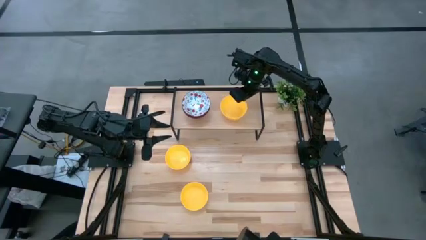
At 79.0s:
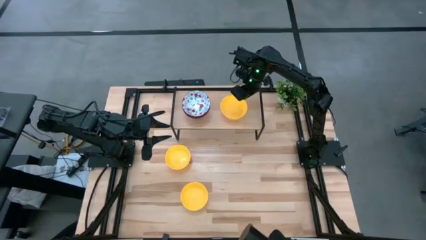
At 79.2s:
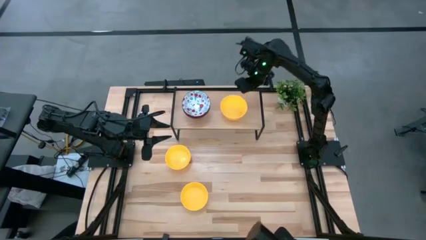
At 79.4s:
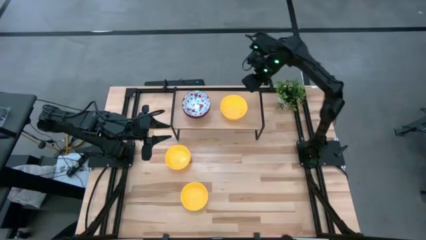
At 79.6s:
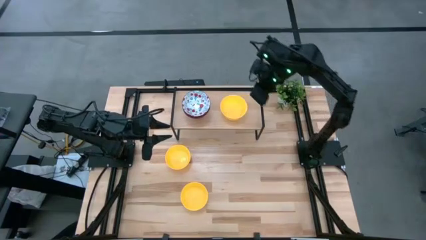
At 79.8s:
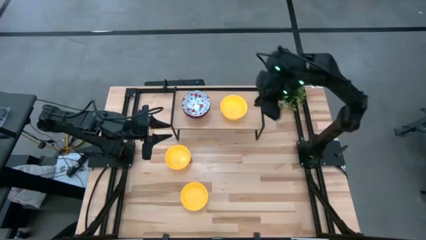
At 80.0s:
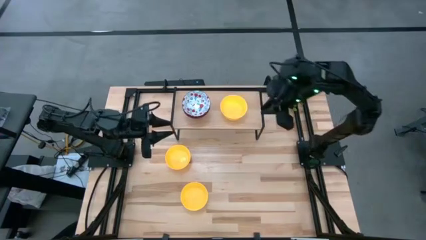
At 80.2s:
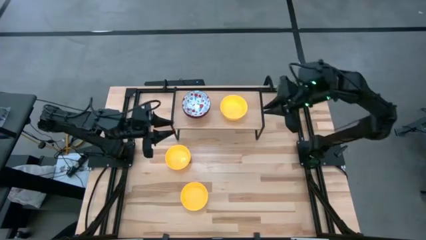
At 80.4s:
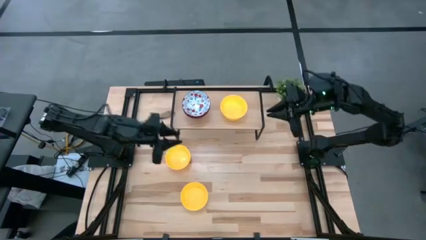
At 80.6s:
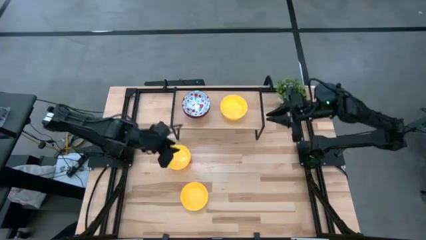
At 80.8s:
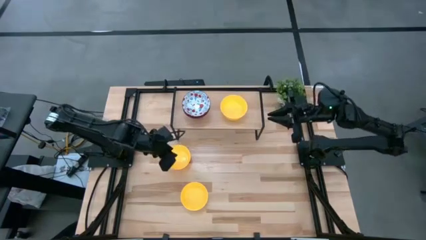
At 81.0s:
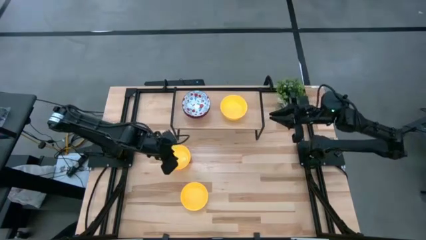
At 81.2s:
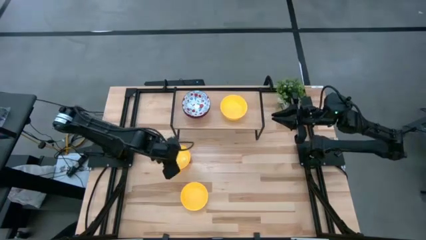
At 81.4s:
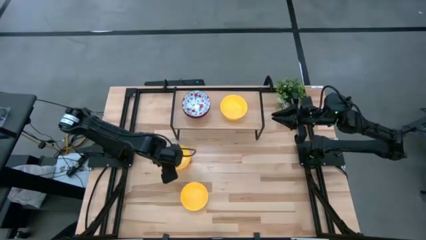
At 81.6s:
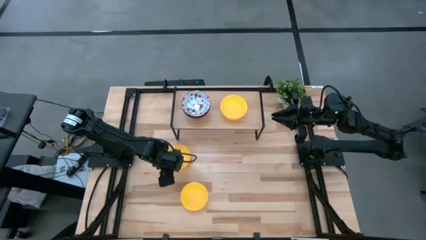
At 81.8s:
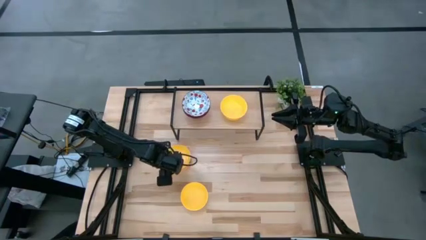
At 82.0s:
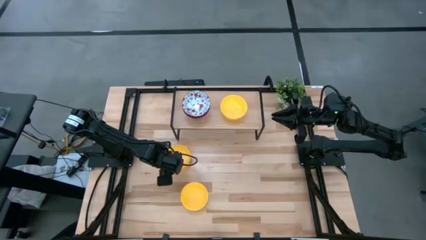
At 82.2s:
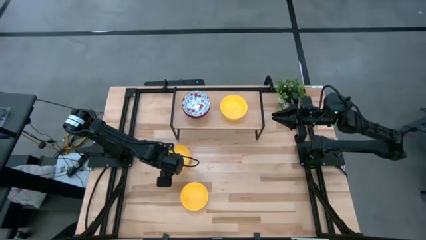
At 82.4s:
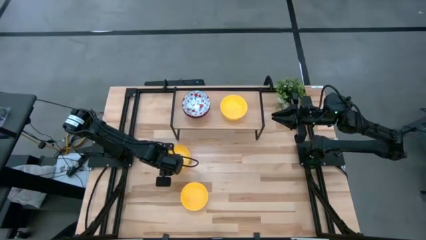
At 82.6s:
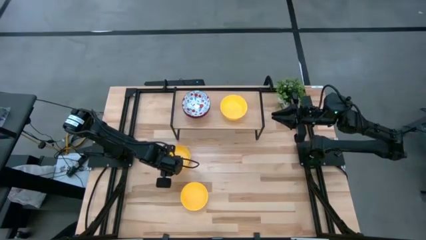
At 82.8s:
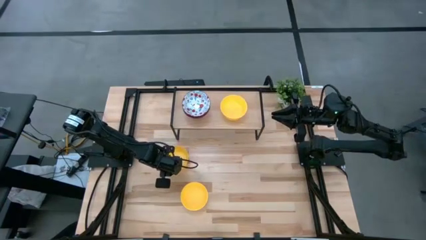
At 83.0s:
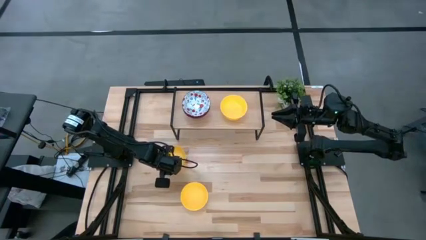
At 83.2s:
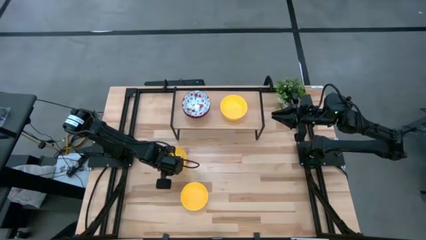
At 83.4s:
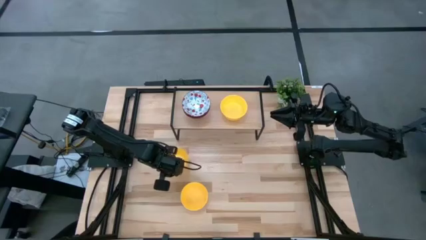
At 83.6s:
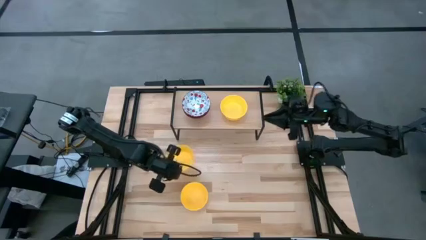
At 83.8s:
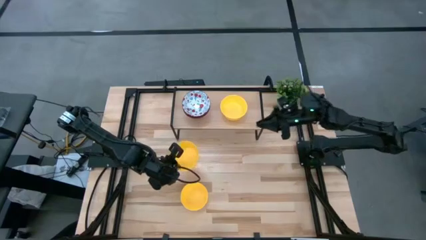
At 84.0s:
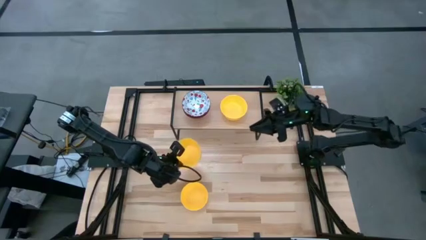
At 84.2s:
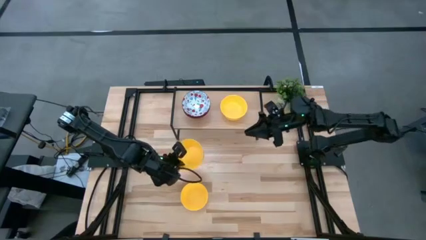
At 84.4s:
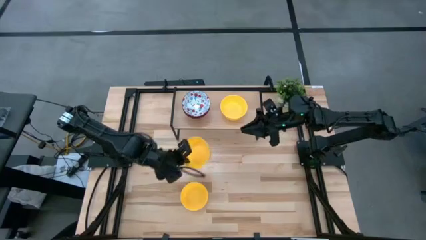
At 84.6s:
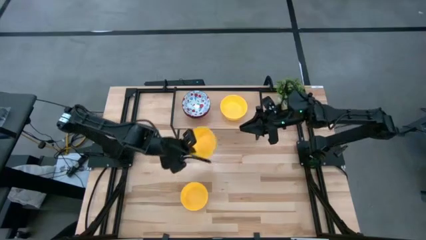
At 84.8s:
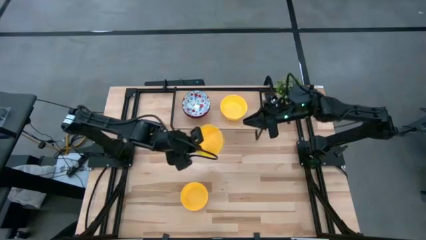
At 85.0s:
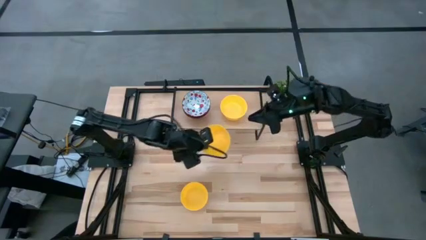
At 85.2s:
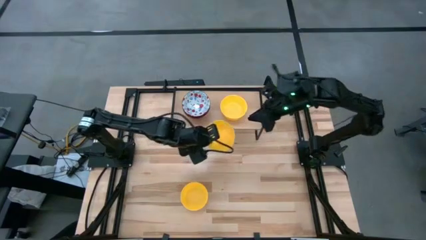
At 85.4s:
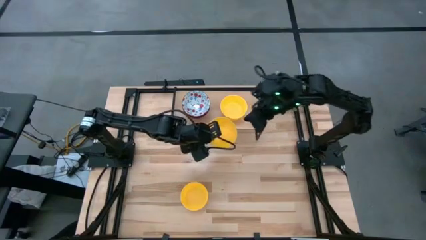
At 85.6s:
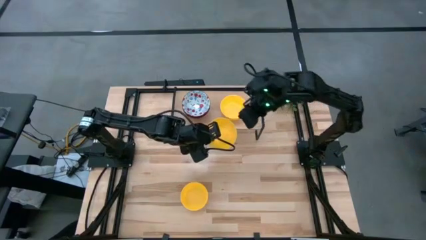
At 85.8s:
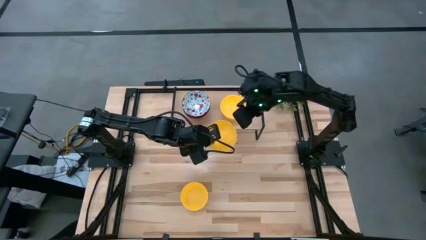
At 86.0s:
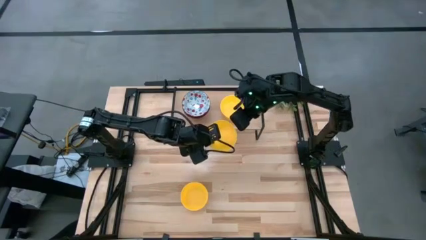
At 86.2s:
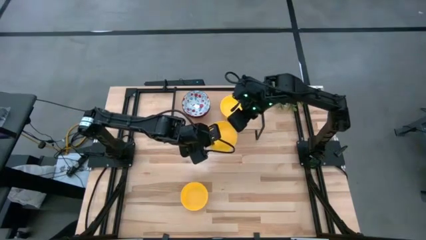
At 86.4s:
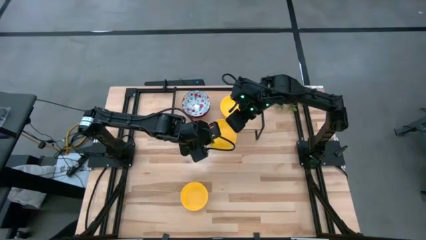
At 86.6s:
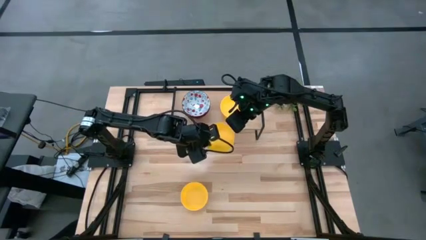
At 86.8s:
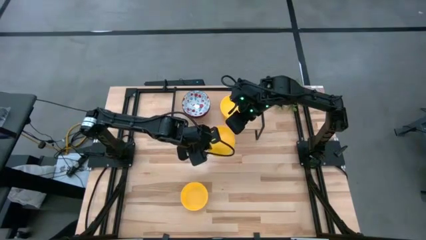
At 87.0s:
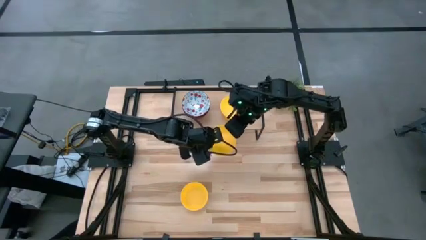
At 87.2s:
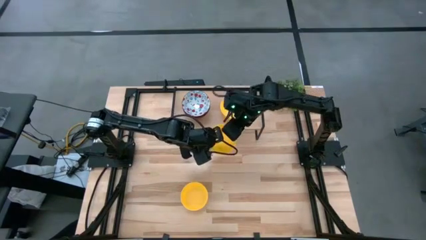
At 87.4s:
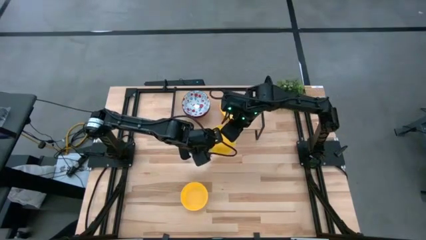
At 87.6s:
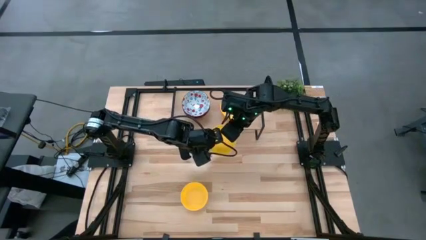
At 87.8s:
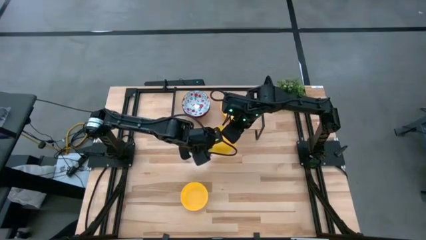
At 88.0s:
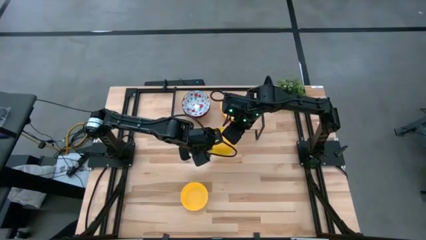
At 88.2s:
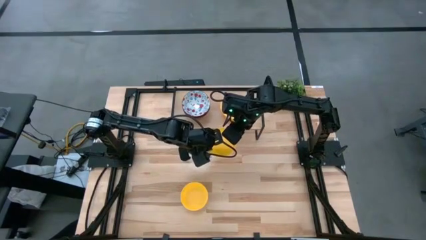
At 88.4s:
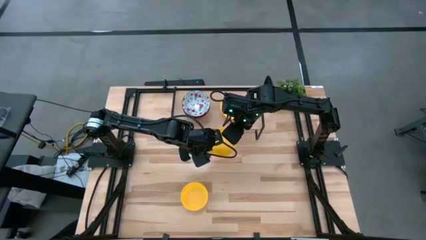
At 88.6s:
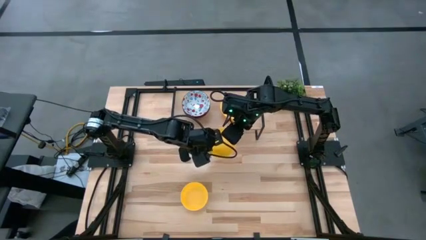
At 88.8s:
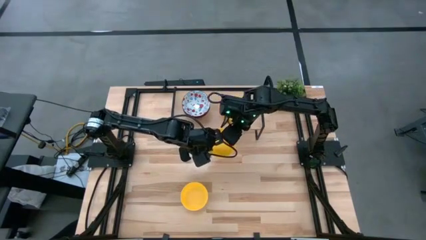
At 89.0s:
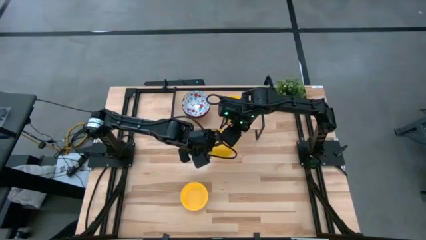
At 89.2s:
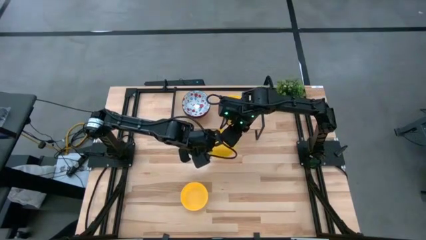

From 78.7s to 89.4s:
Task: Pick & Place Mini bowls
Stack the top yellow bowl on the yellow bowl on the shelf

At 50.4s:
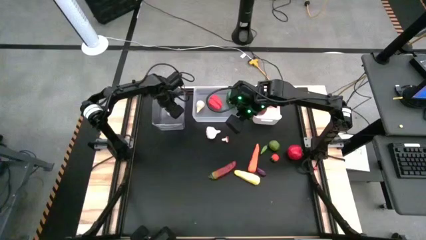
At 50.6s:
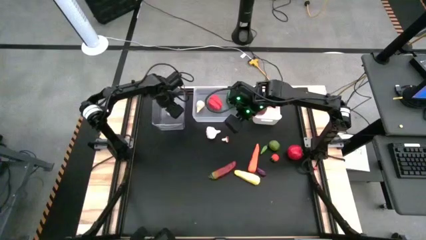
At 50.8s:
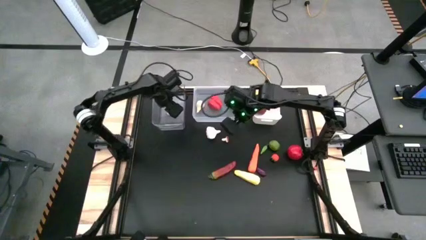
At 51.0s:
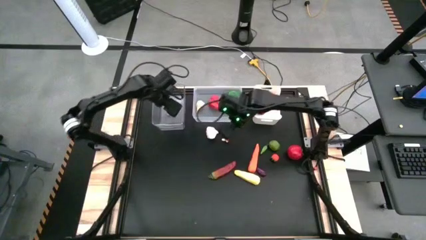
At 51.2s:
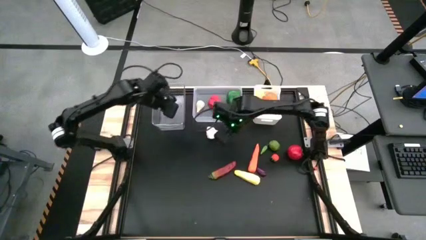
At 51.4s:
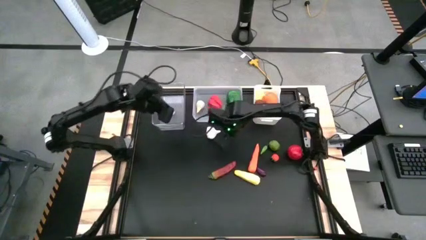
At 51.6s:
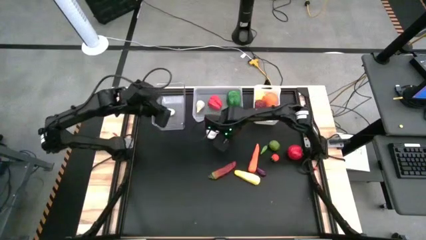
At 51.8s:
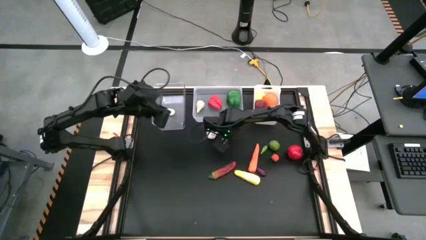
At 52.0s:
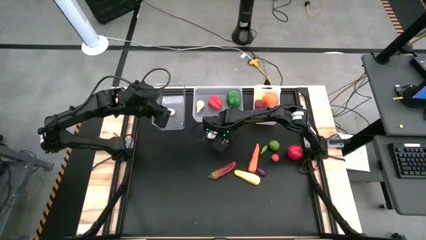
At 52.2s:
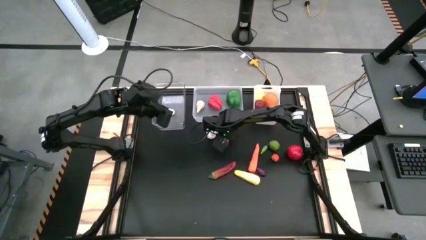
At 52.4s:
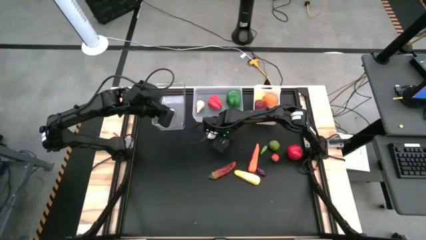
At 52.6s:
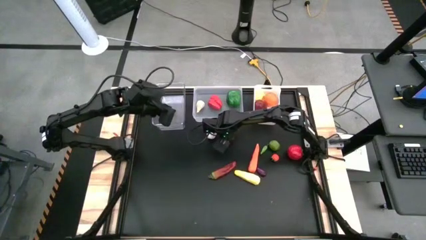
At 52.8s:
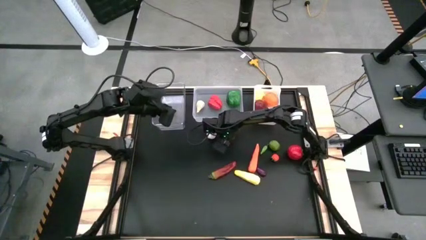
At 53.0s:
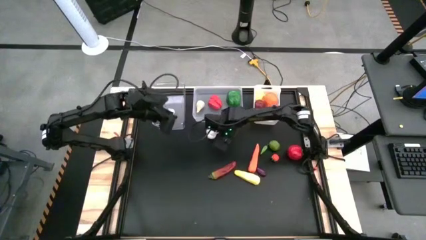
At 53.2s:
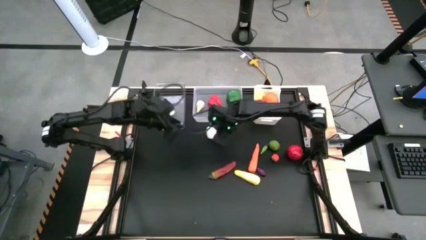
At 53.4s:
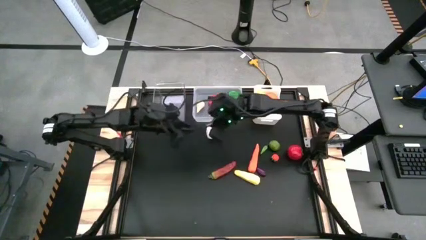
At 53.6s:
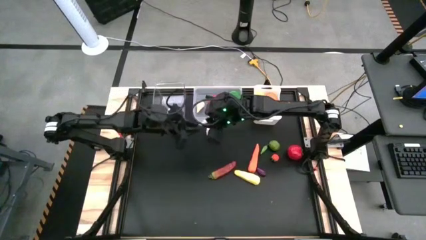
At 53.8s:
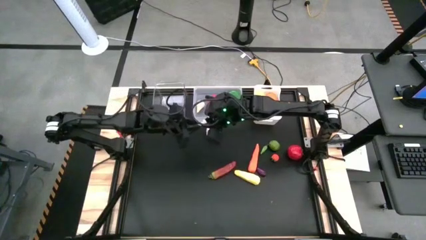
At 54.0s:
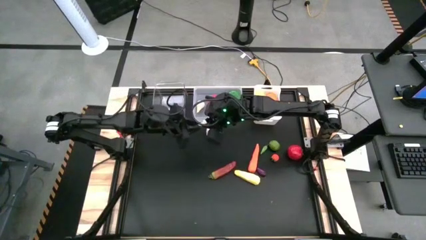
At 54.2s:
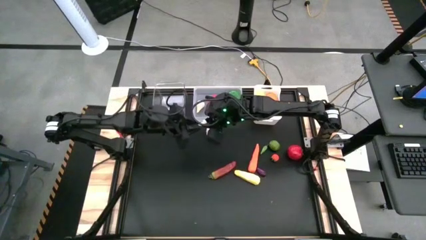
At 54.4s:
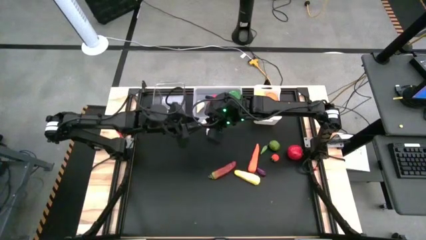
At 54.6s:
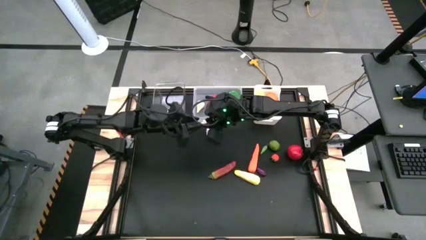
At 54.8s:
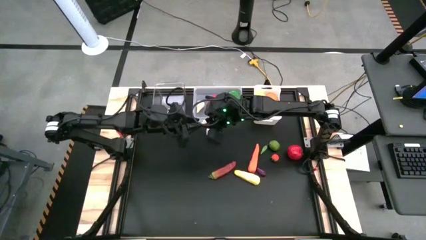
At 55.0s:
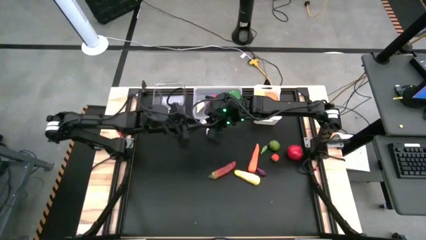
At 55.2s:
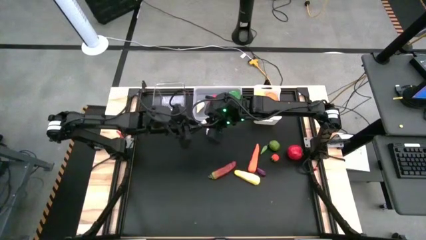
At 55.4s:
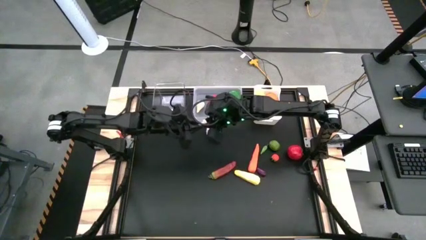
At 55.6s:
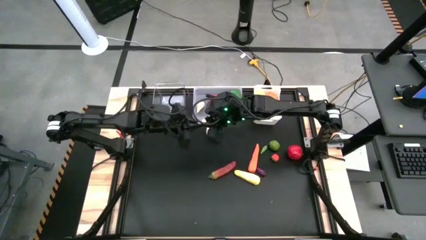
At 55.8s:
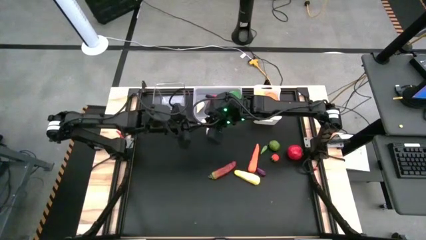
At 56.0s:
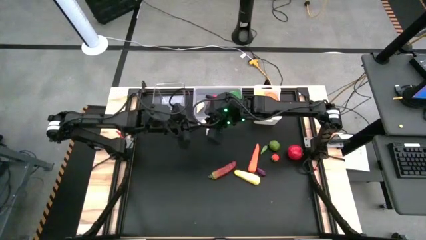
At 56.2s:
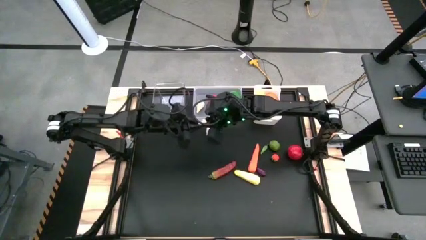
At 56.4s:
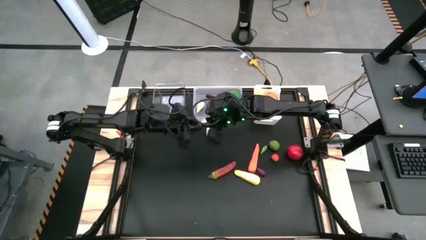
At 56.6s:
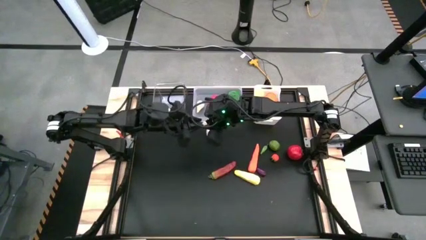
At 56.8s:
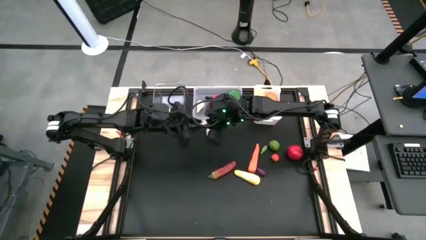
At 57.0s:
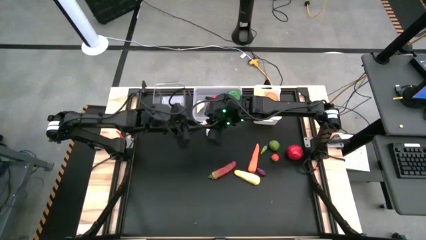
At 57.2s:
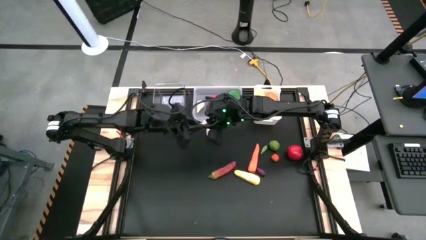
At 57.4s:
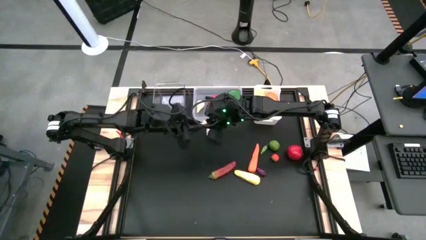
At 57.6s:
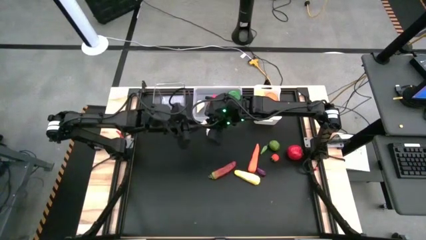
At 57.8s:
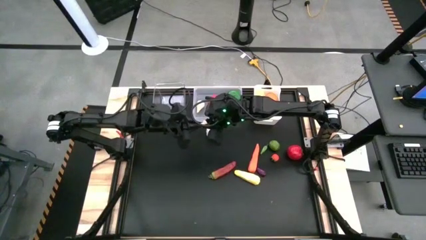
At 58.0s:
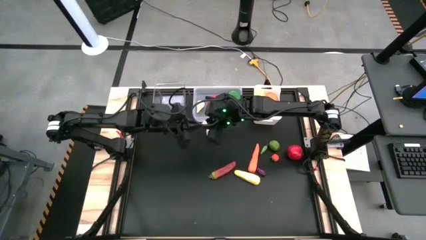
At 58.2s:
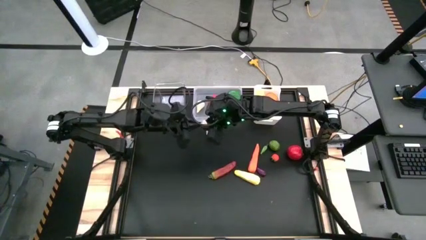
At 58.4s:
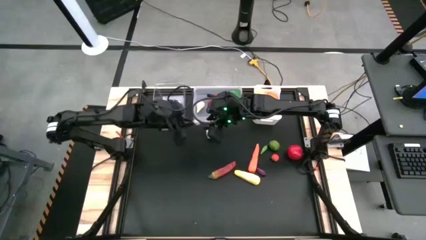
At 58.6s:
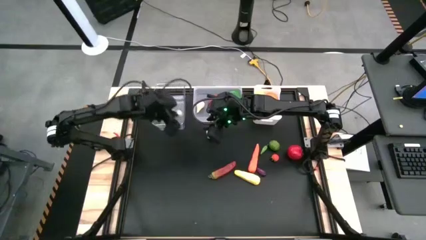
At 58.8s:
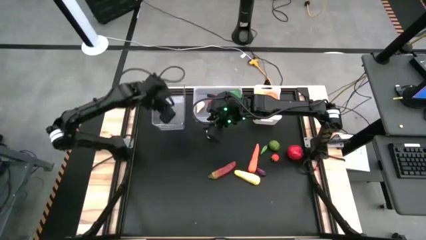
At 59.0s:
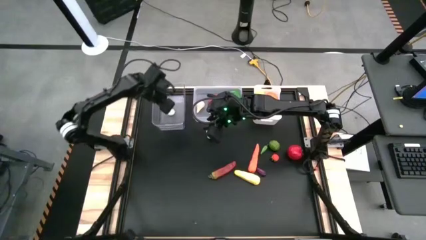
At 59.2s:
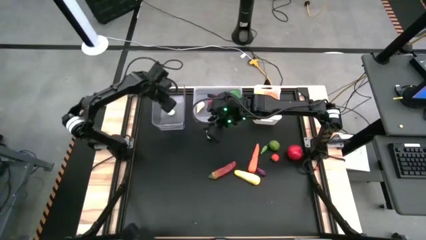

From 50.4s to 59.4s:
Task: Sort produce into baskets
Put the brown mushroom into the glass bin
